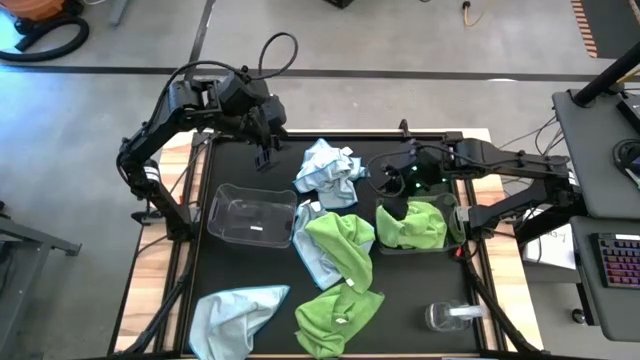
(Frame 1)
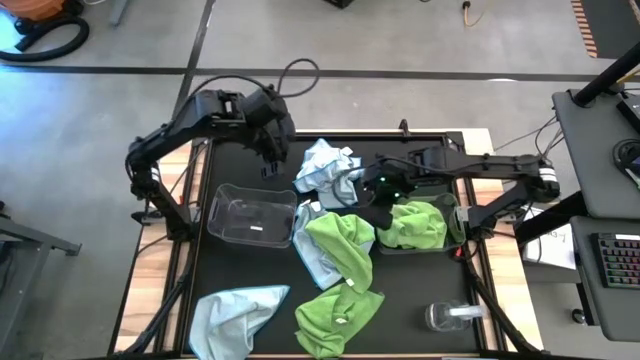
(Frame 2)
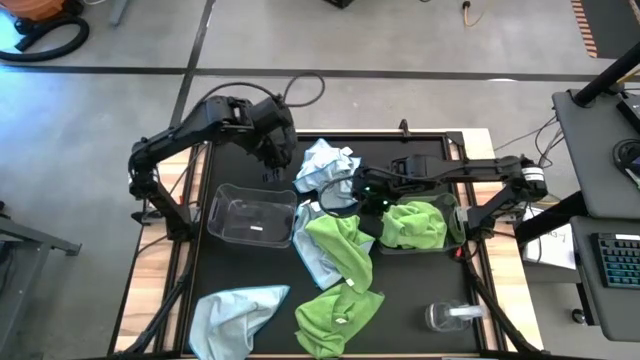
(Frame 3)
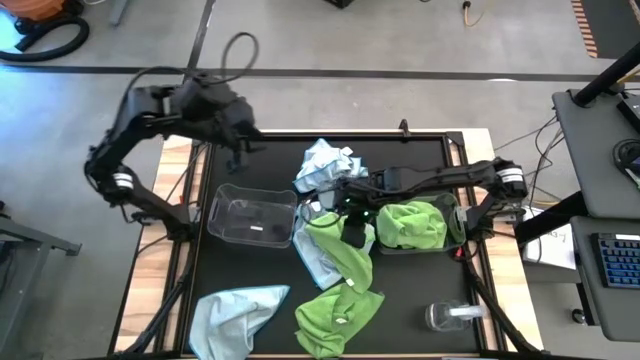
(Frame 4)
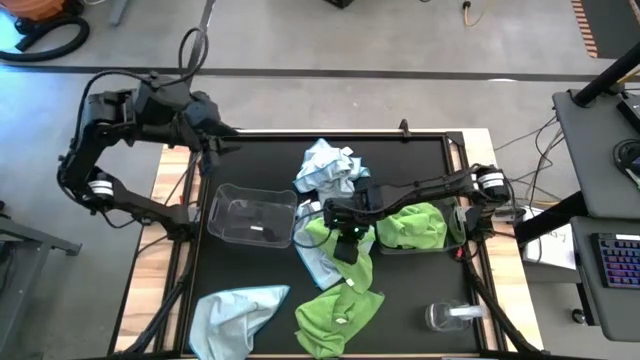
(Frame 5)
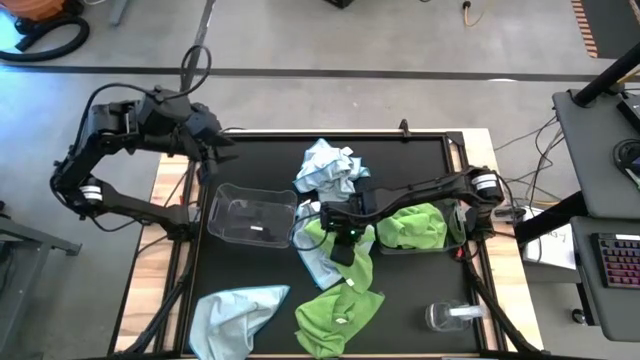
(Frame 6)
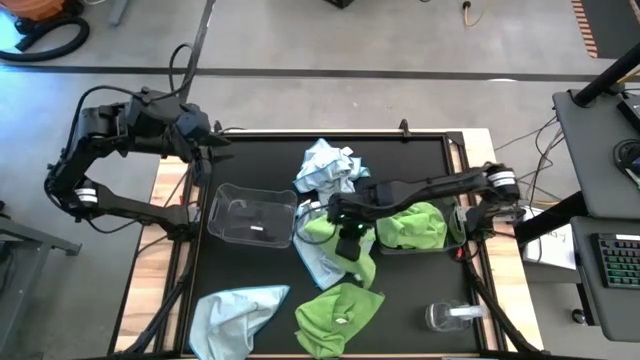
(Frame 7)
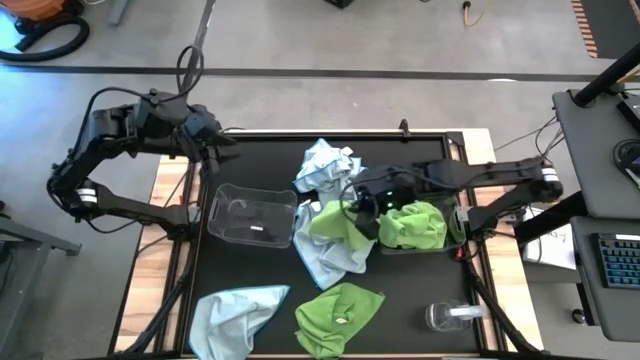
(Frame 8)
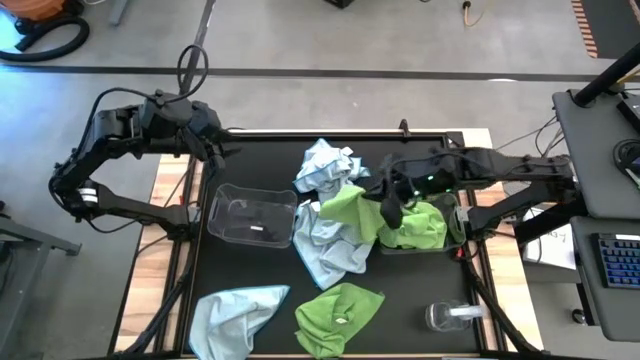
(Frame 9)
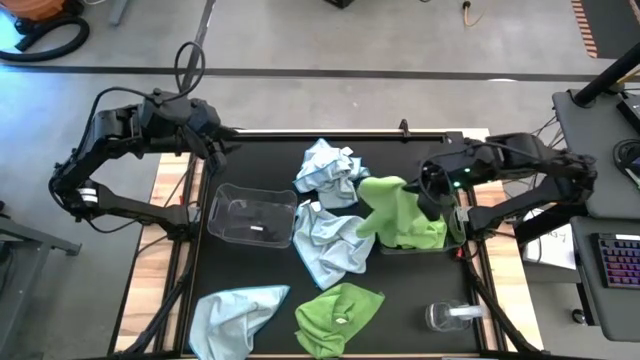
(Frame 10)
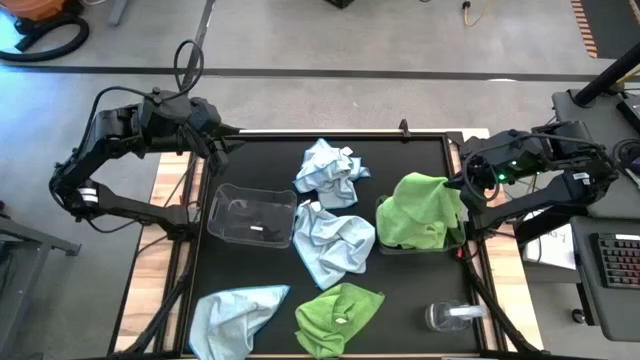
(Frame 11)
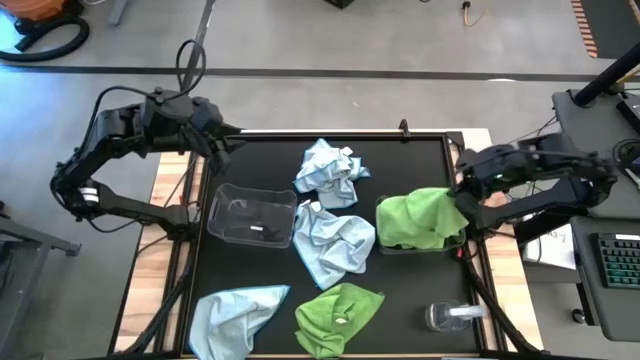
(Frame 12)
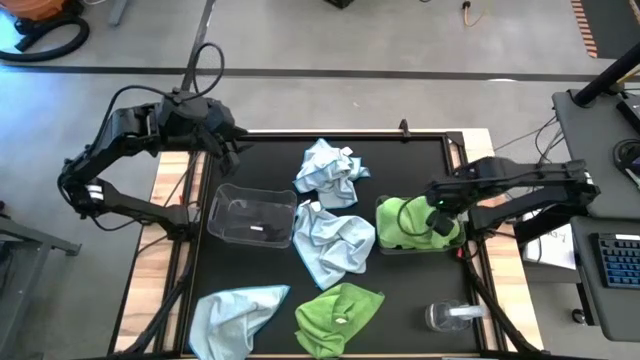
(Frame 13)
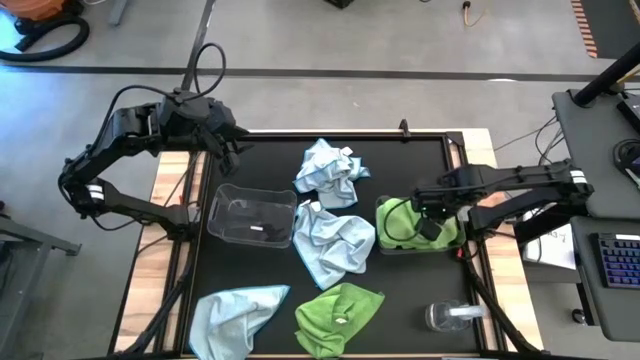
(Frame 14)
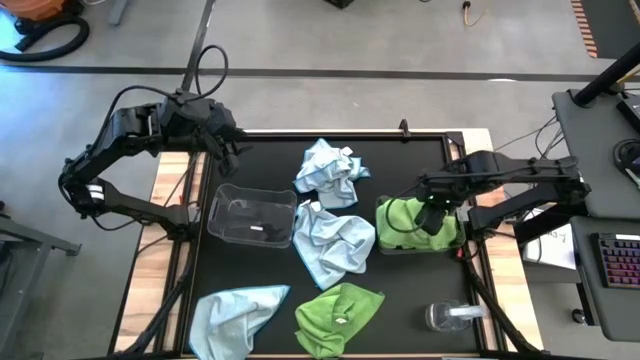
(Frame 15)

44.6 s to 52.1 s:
Task: Sort microfiber towel by color & place in baskets
Put the green towel into the right transparent bin

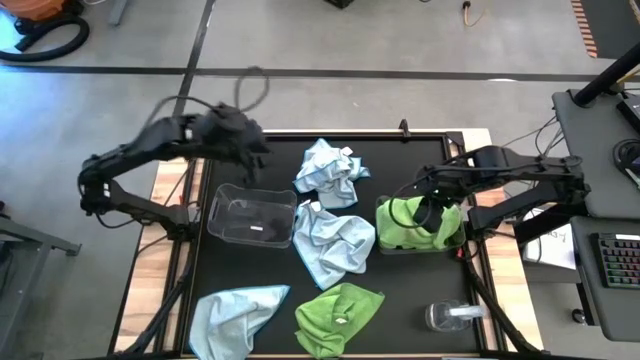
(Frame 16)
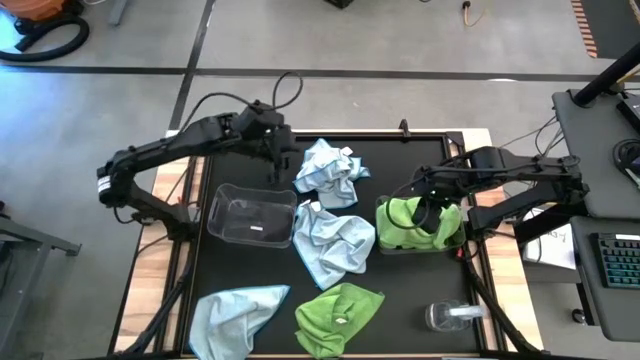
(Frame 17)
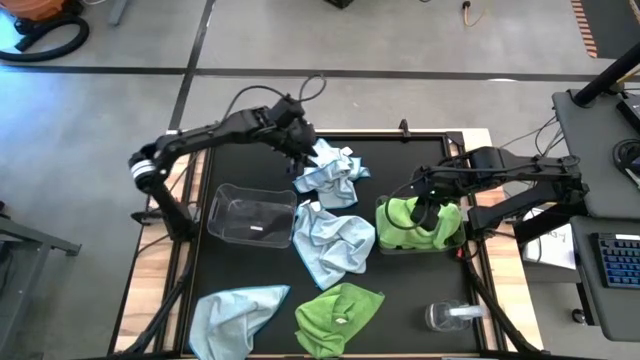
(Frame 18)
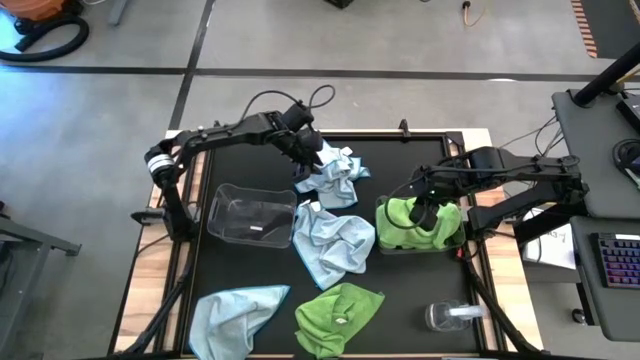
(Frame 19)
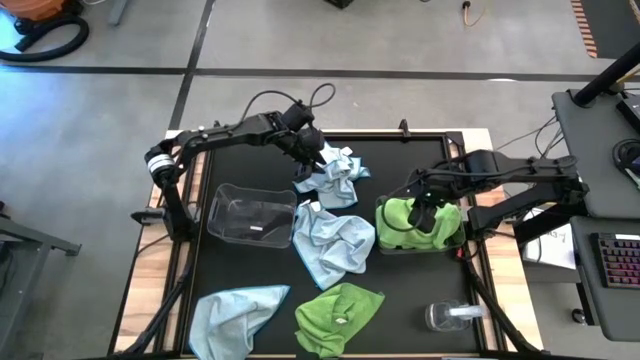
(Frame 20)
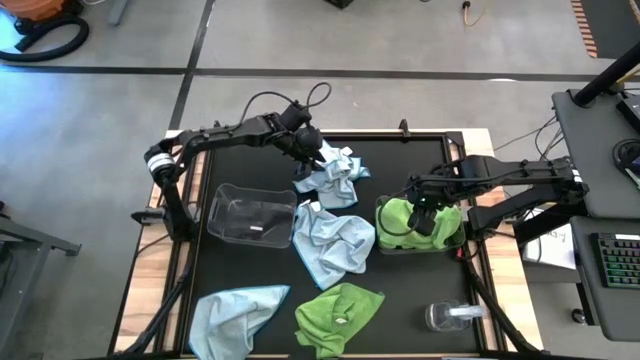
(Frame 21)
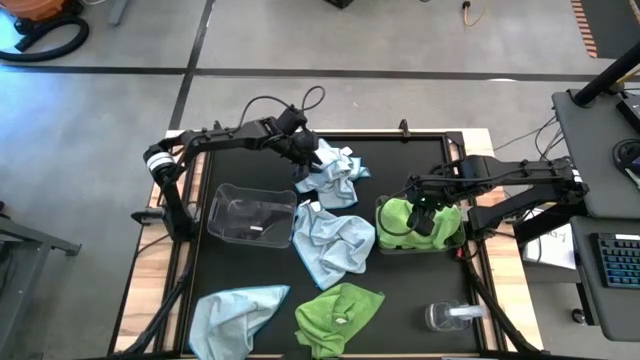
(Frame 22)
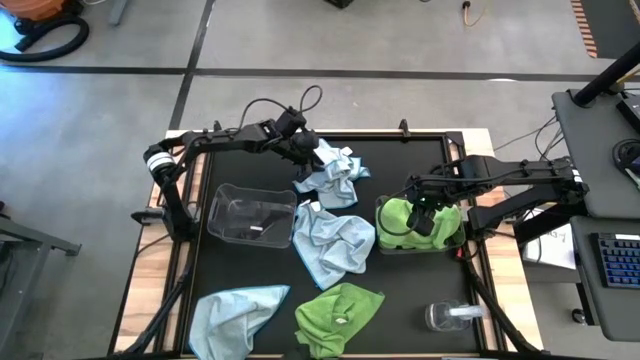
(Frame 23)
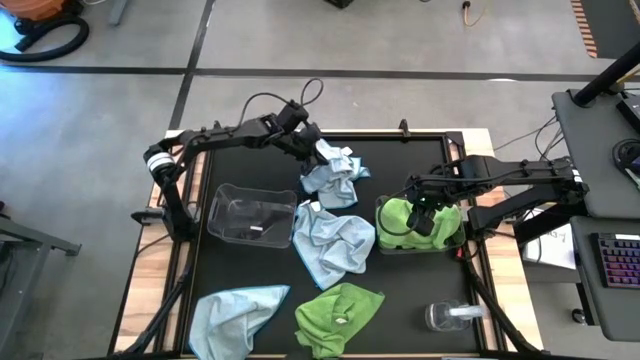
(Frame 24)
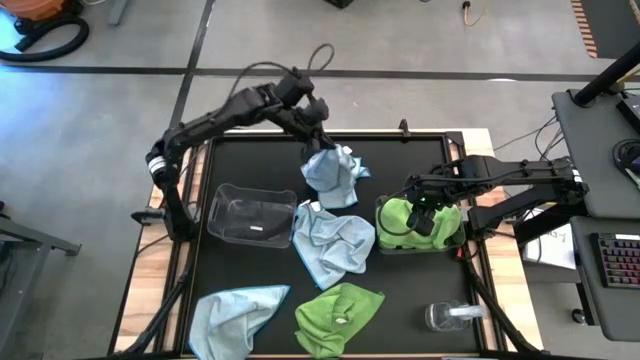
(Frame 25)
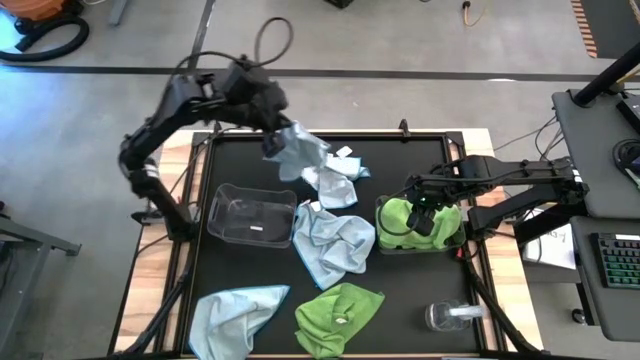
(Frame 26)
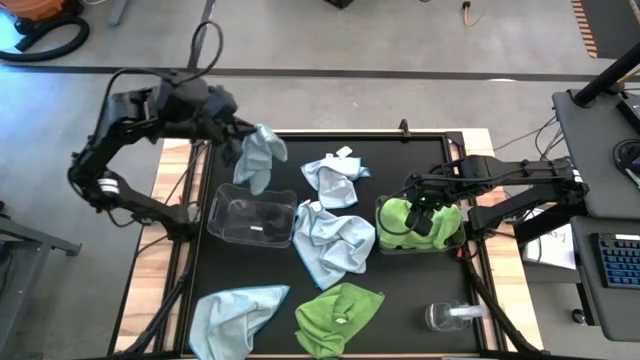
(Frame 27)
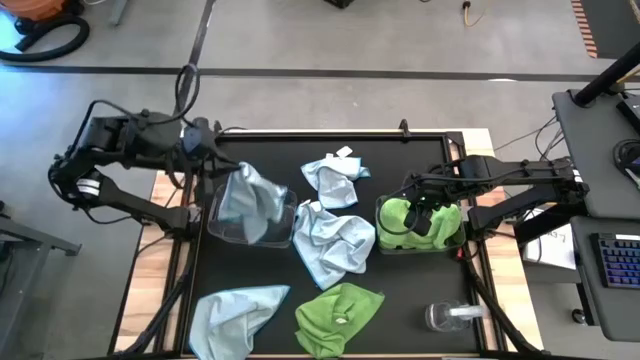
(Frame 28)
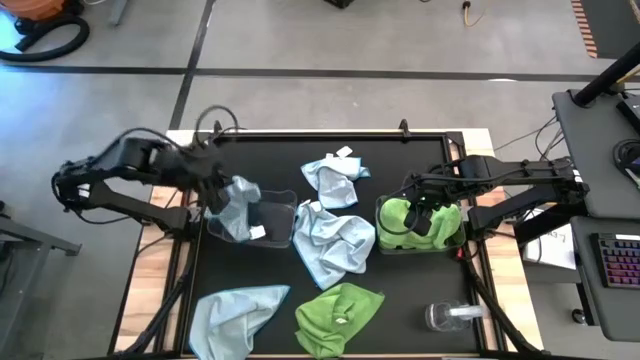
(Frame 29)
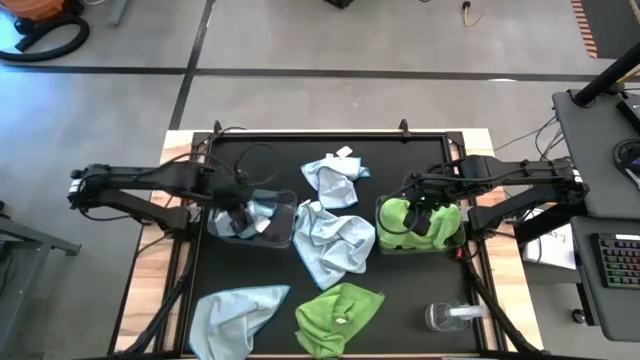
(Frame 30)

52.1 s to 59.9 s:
Put the blue towel into the left transparent bin

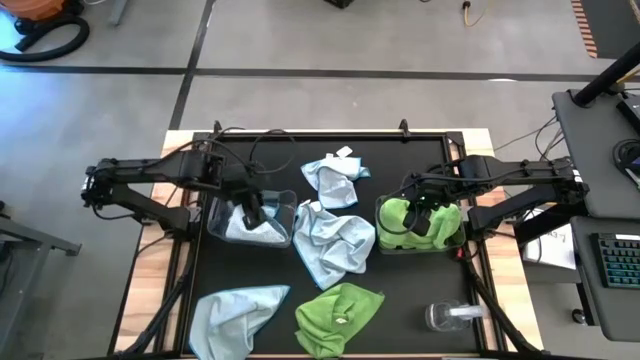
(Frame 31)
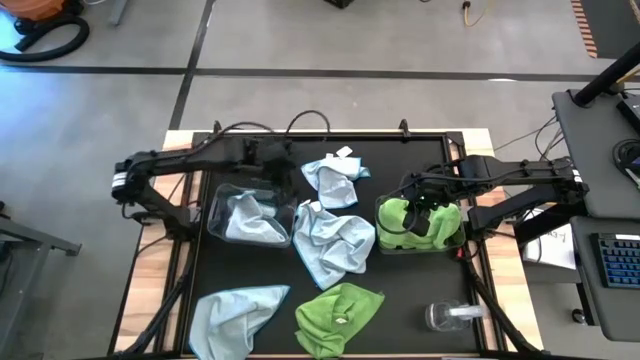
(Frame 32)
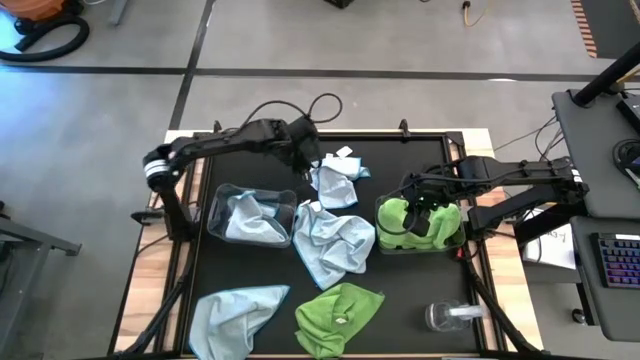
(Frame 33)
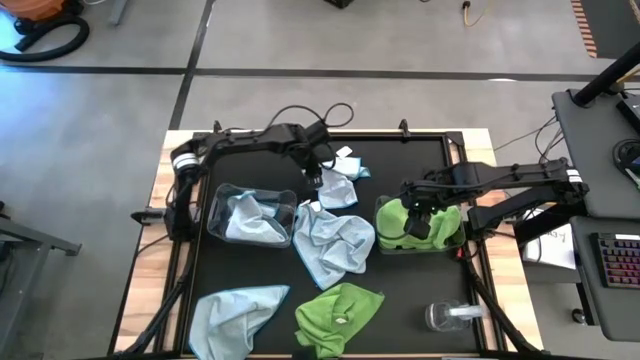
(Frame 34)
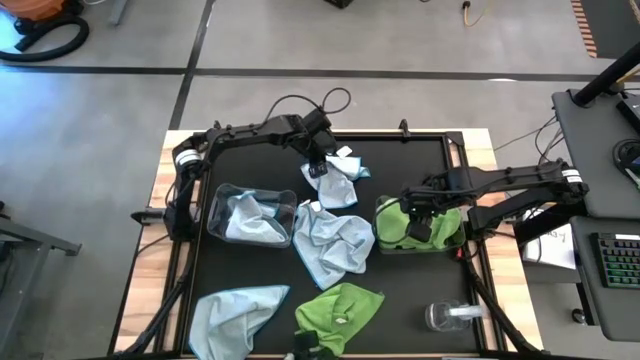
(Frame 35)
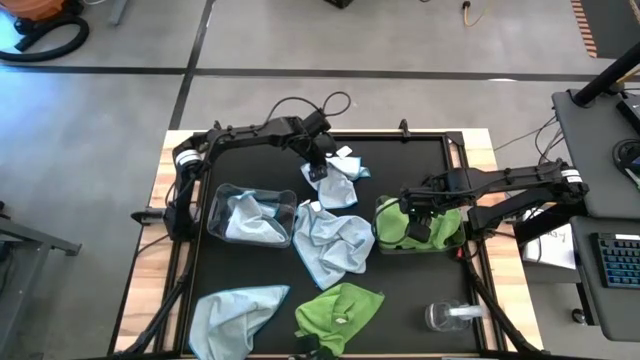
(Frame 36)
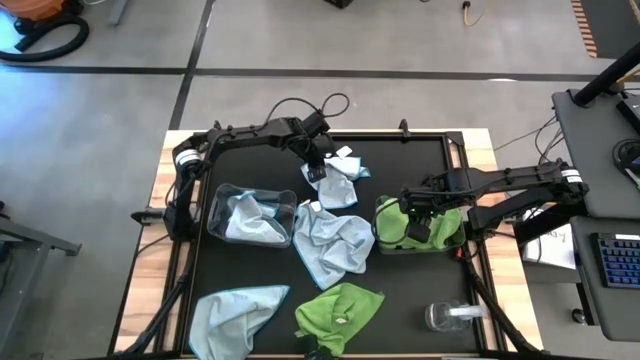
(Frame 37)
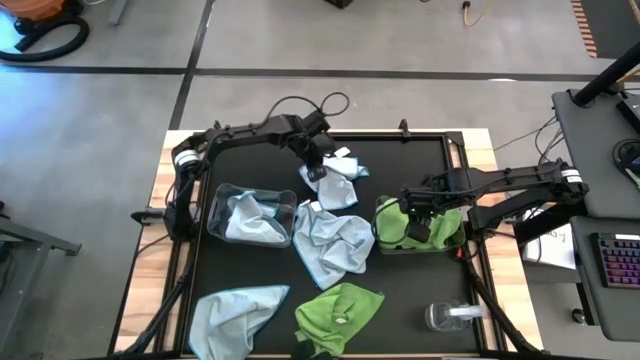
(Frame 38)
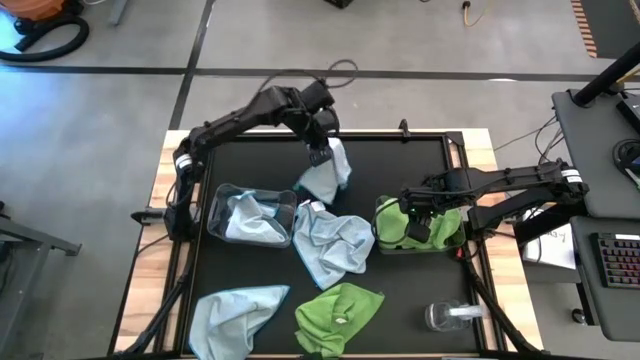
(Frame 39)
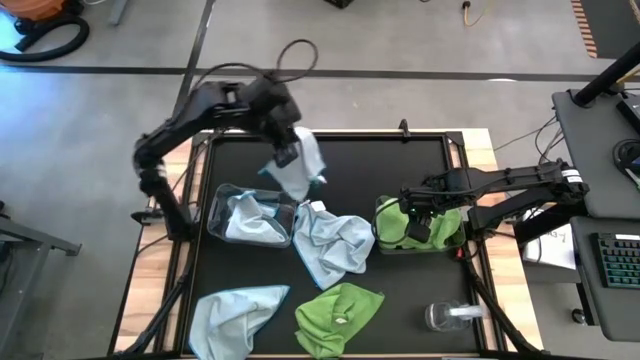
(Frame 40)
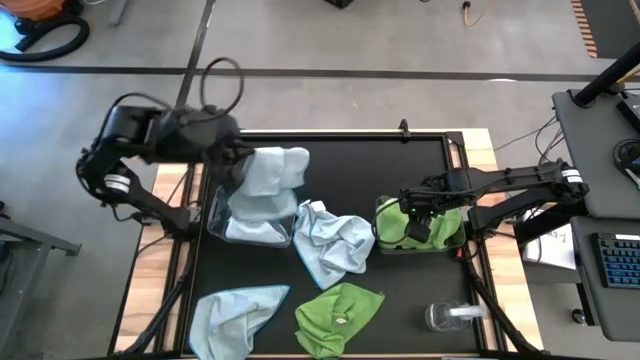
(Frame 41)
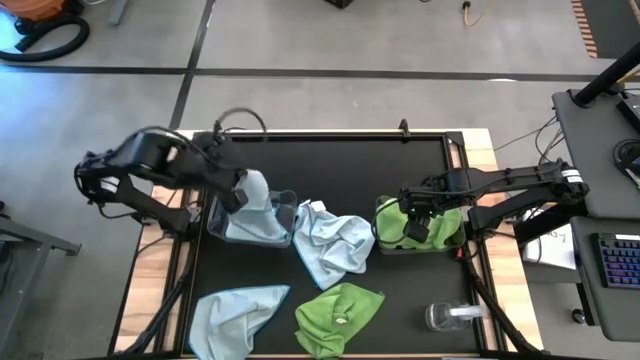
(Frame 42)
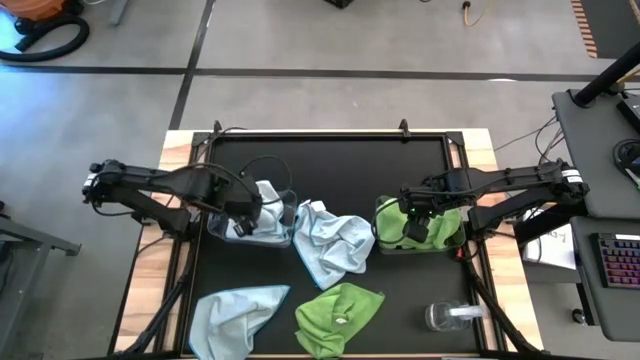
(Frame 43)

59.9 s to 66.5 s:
Put the blue towel into the left transparent bin
